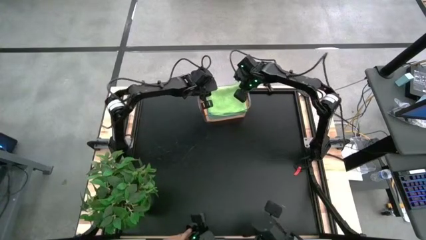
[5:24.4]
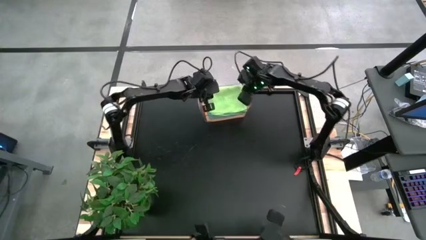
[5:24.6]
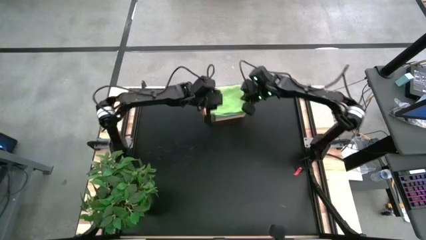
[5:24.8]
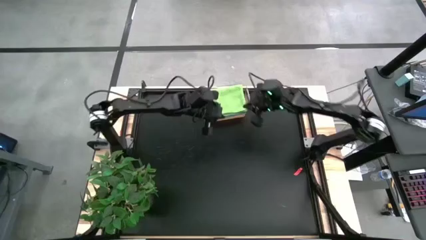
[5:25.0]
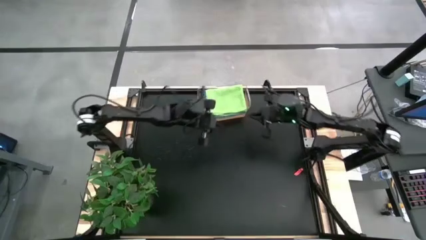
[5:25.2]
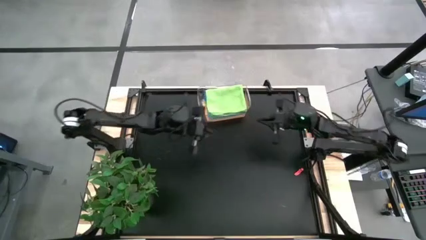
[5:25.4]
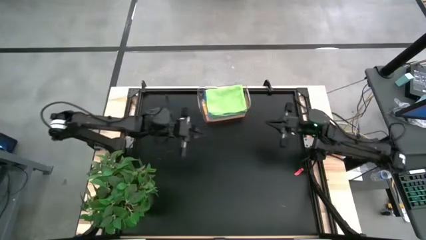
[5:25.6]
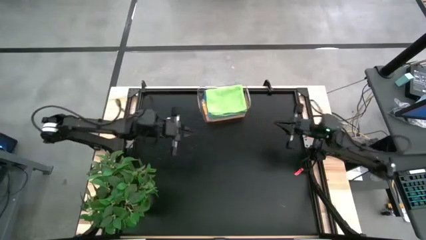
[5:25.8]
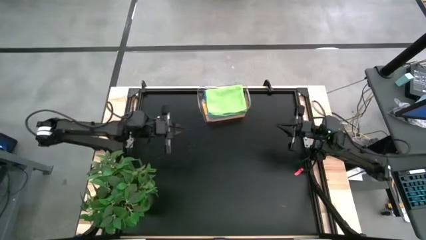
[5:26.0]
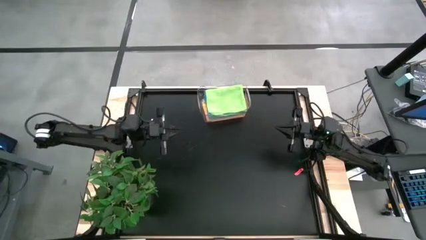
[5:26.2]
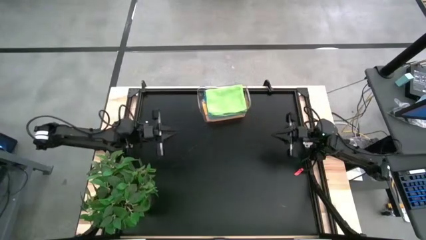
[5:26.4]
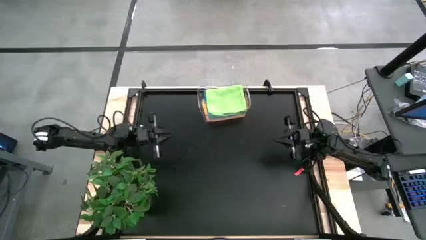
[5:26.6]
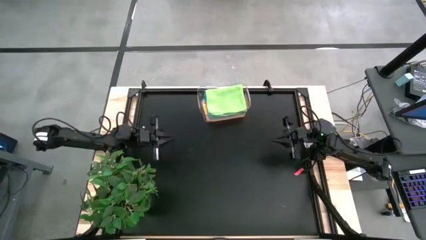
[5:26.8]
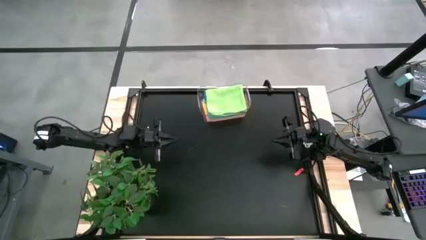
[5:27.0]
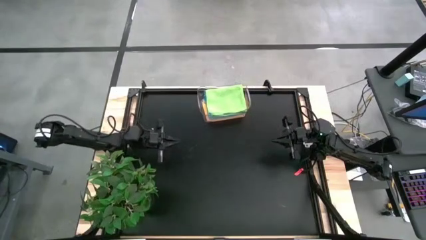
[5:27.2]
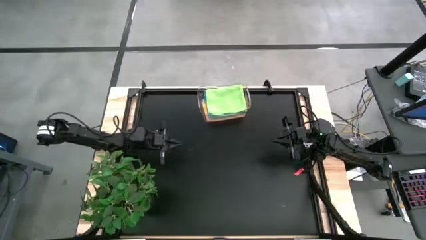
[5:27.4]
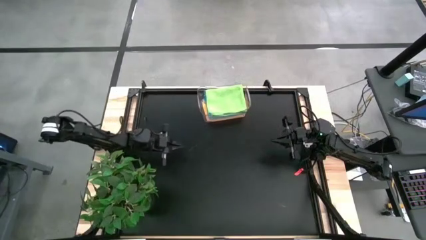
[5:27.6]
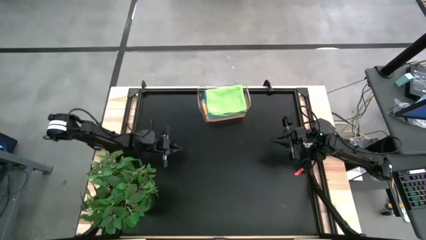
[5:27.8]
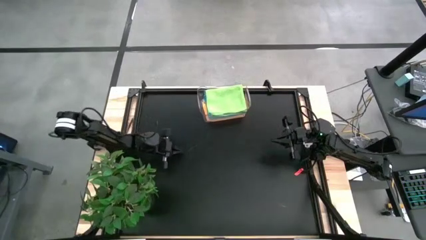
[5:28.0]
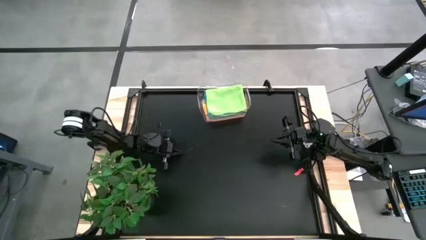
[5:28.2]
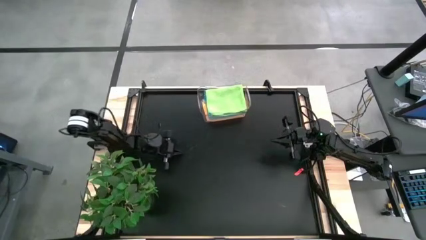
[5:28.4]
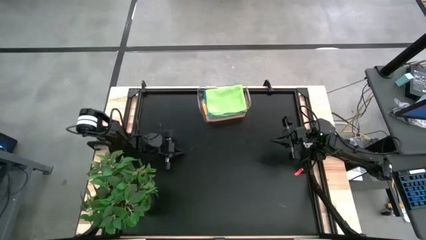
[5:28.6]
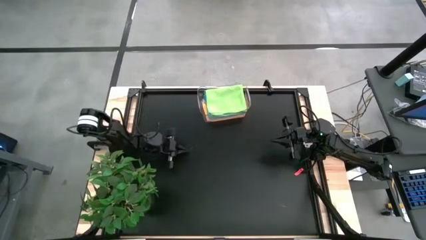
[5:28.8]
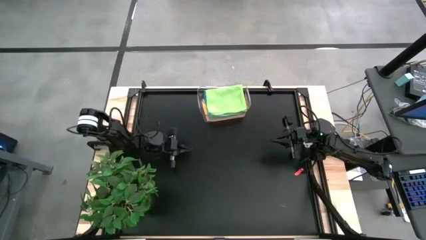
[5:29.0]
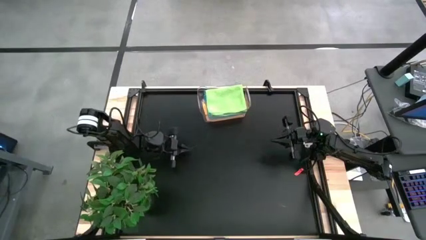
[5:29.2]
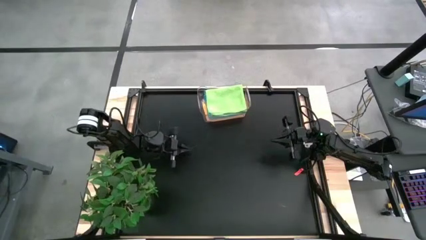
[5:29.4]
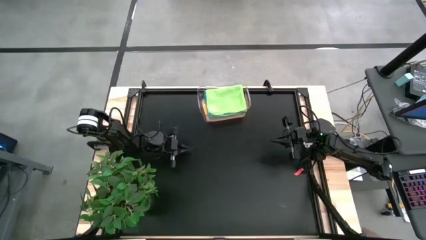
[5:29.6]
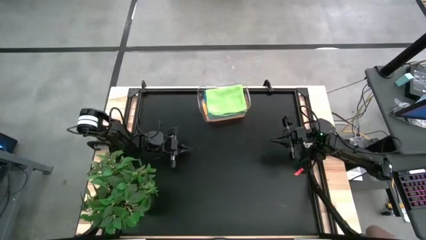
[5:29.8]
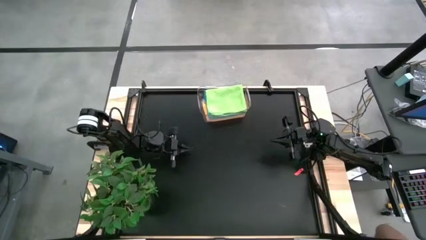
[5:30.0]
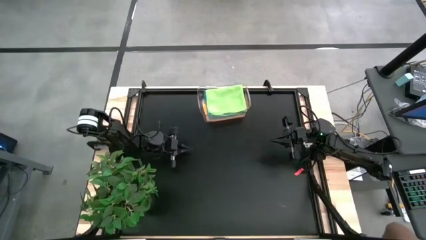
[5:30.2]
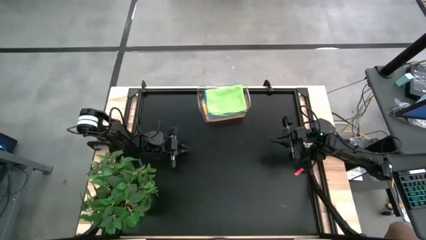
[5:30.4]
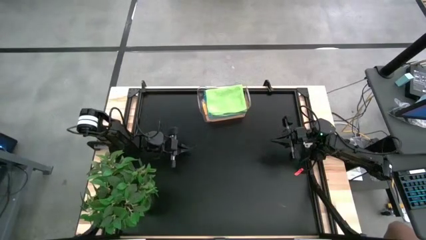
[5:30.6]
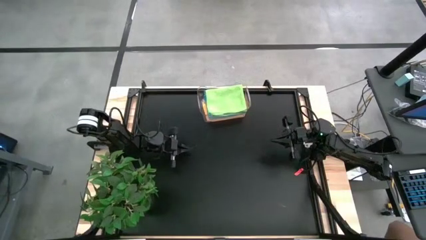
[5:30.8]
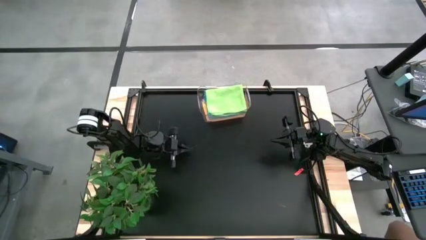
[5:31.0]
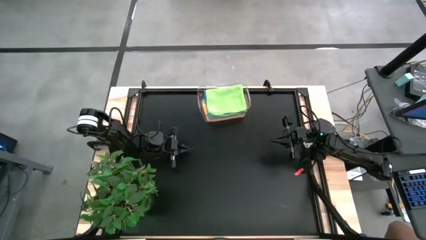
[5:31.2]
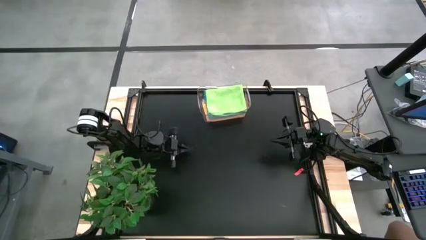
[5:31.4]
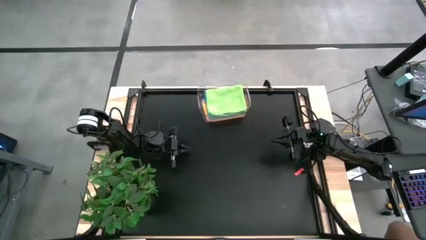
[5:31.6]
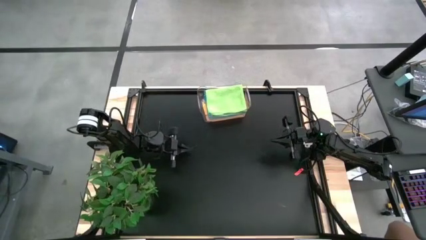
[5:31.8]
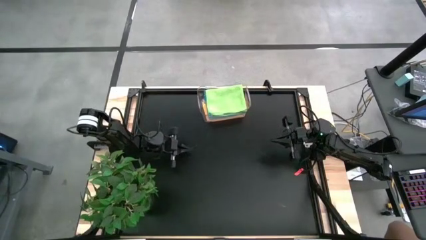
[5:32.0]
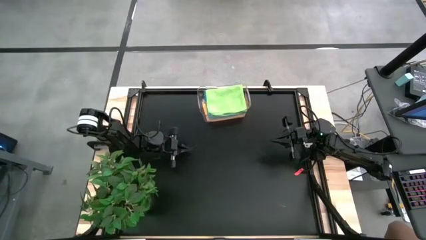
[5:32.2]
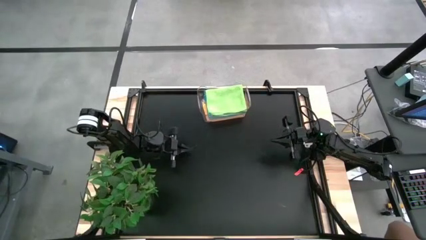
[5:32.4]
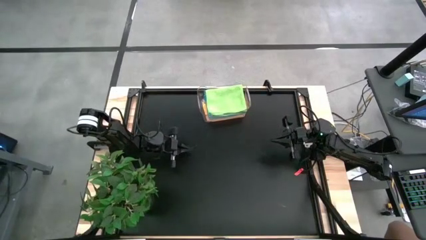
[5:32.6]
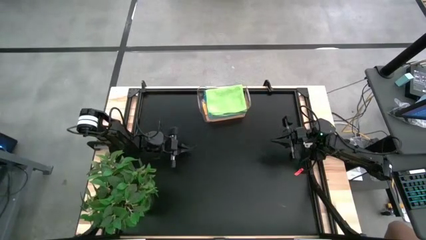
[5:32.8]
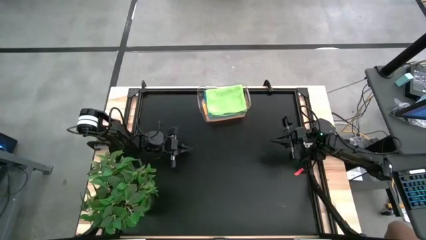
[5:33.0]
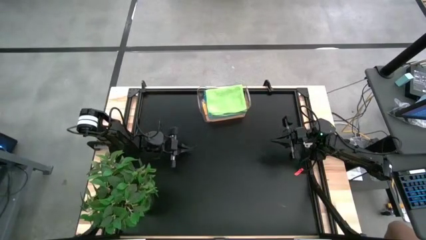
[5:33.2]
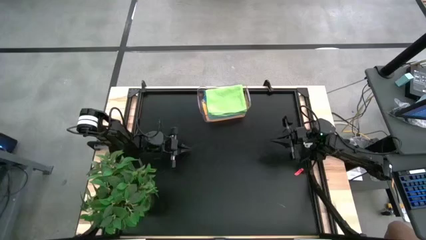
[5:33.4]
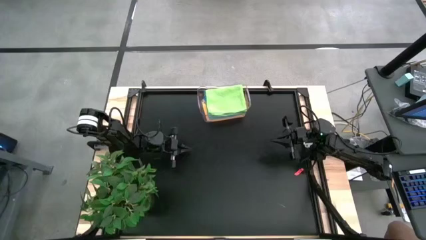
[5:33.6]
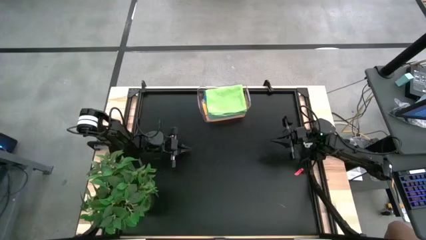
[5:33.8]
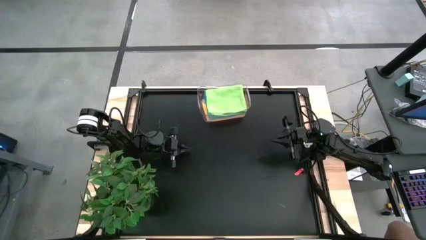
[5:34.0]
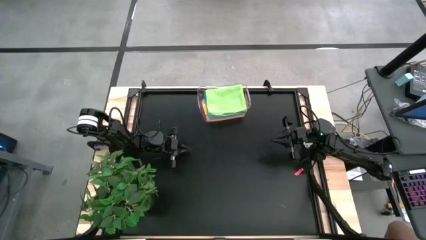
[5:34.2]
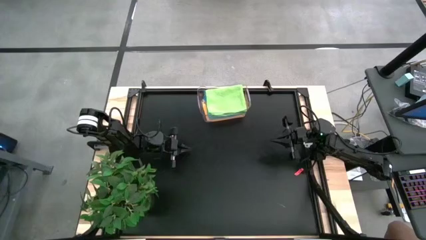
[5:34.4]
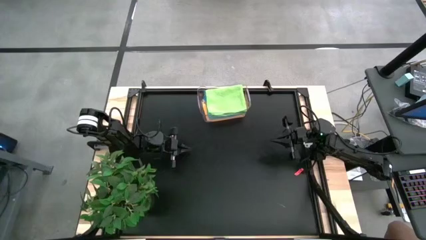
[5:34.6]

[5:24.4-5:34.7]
Task: Fold microfiber towels
Return to Home Position

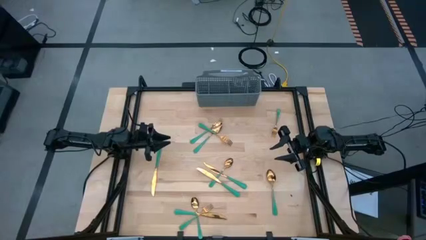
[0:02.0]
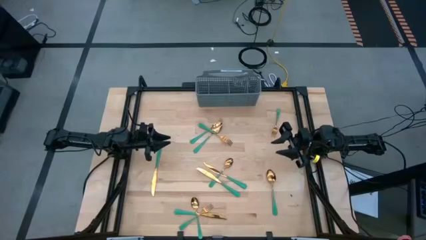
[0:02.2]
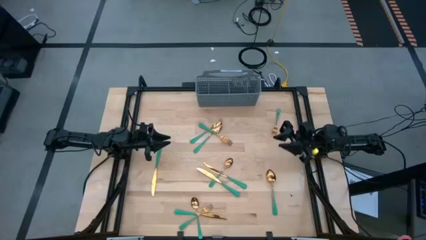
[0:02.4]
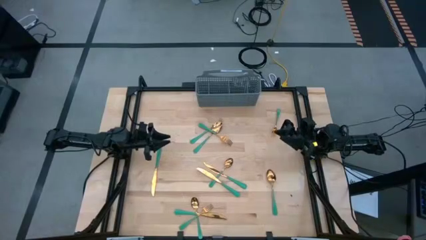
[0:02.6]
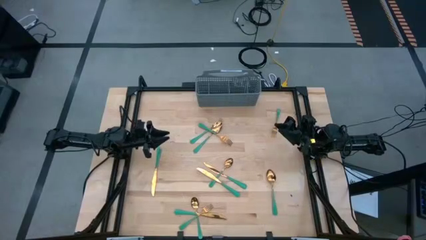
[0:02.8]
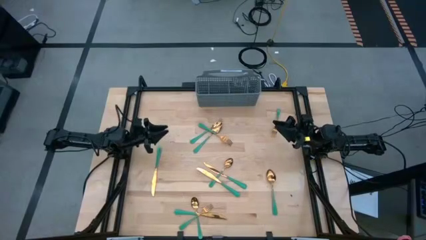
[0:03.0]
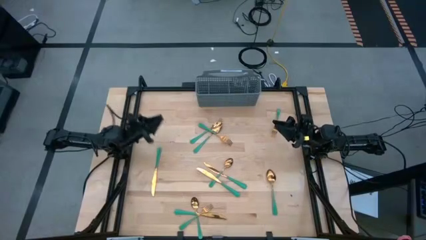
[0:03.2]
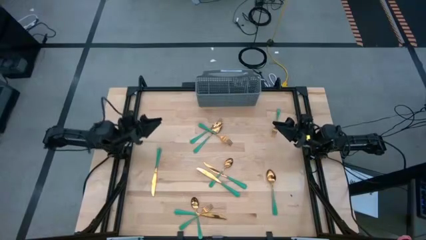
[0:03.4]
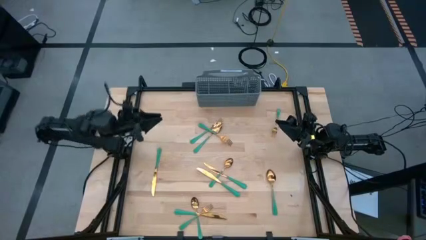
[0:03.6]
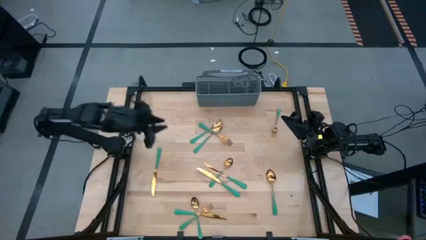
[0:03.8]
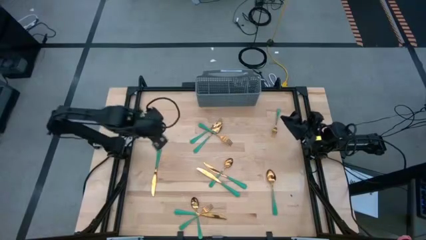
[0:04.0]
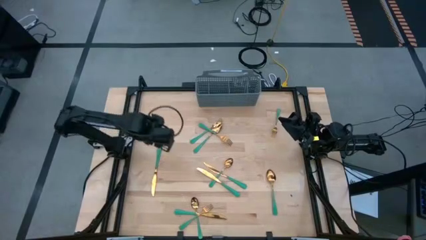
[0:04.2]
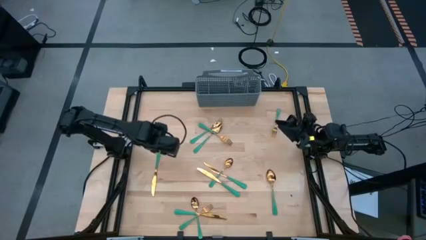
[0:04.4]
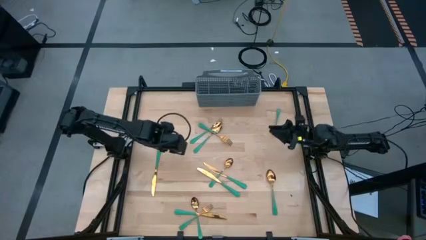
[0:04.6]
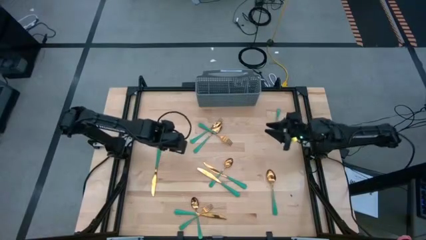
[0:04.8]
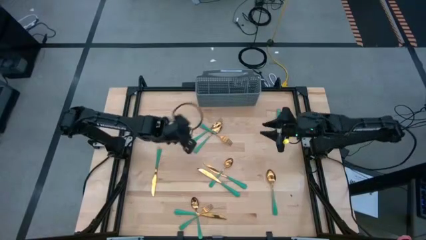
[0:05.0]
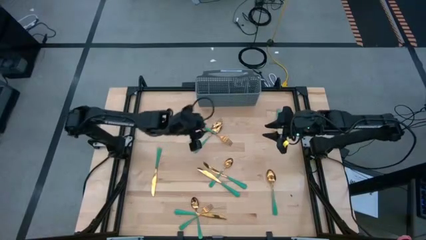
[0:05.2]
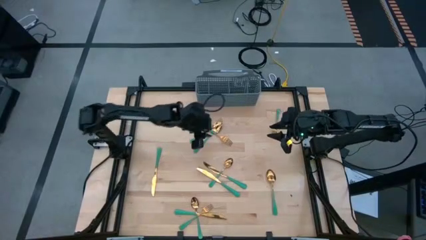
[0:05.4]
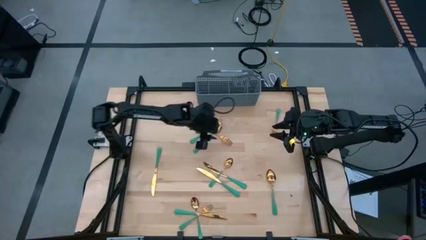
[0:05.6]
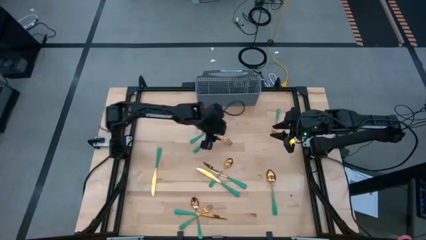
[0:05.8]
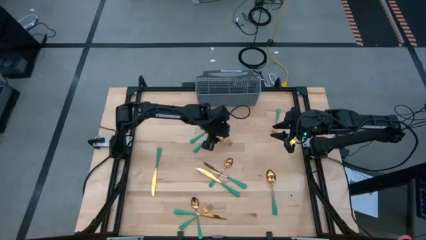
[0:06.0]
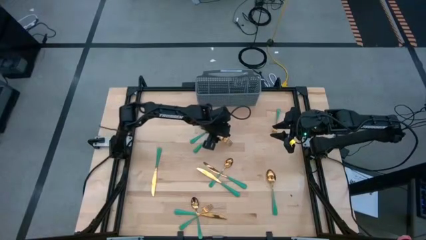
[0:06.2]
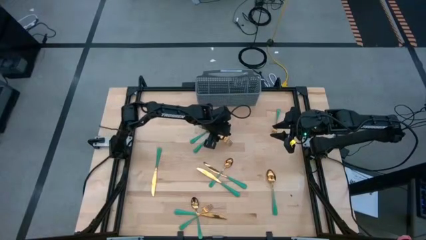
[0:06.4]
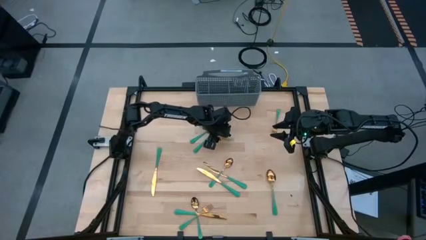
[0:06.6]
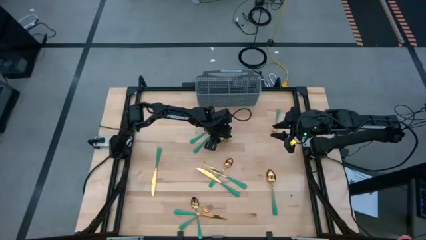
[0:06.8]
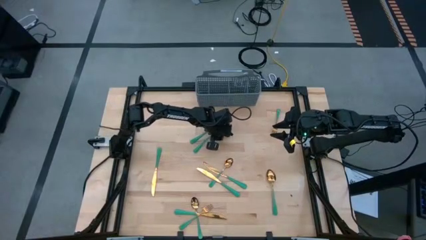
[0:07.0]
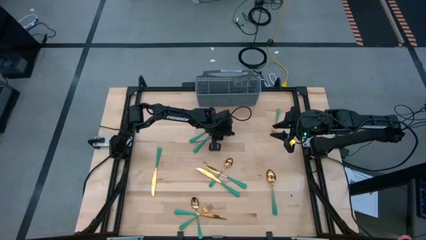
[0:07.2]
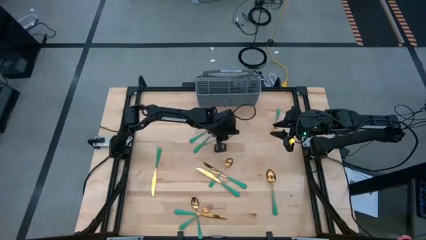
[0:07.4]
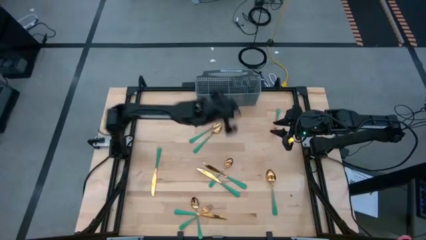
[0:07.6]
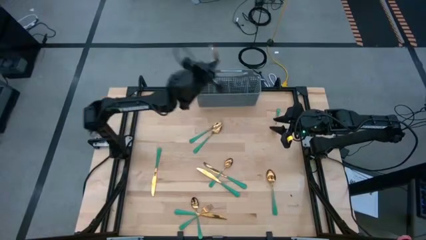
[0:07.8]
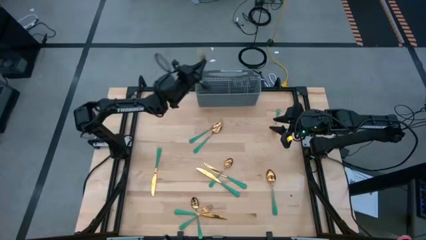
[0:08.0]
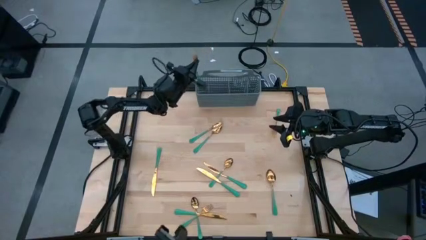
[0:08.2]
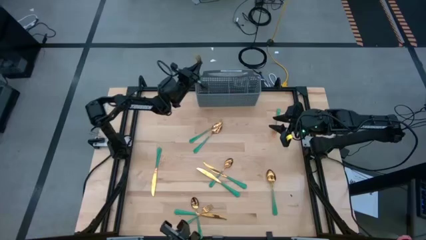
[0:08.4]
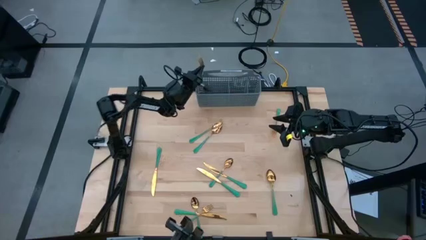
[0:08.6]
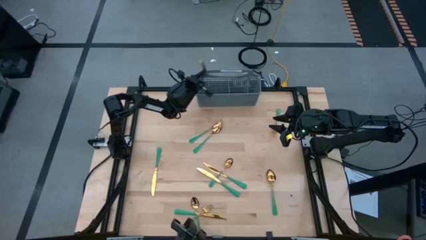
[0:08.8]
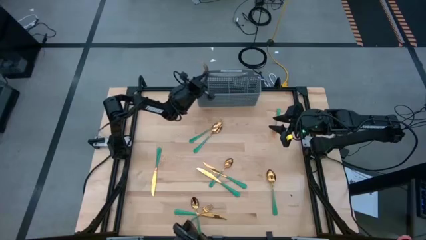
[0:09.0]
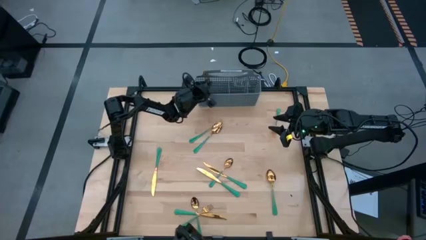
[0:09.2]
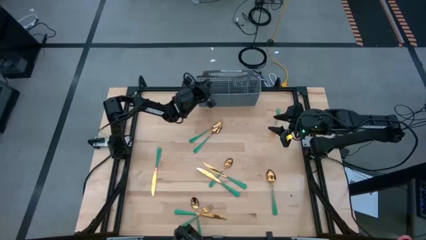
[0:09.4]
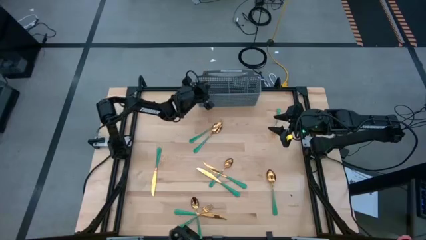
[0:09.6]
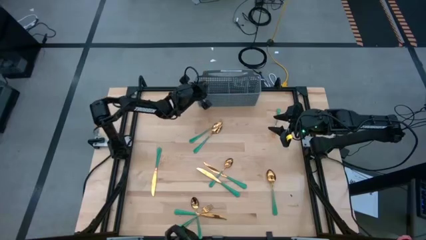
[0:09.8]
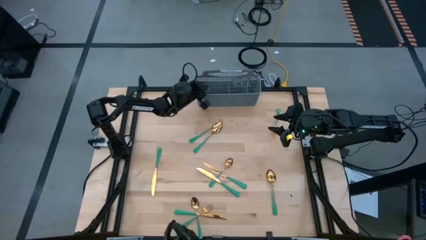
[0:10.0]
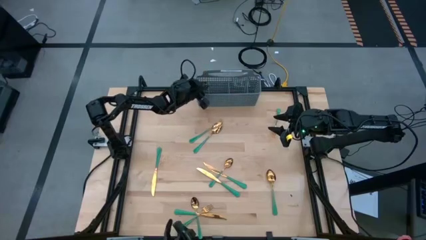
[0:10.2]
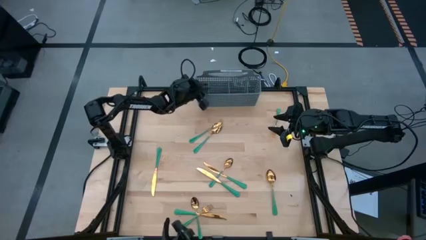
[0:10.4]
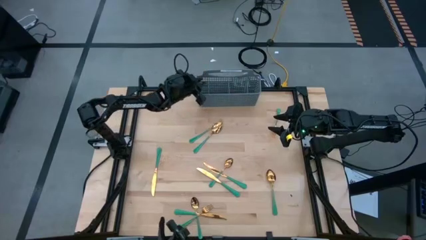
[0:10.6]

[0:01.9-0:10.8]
Task: Sort silverware
Put the green fork into the gray silverware basket
